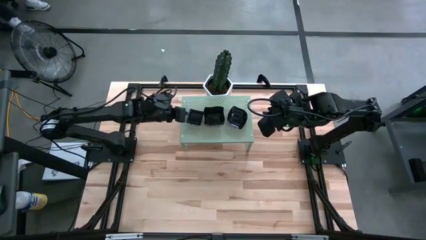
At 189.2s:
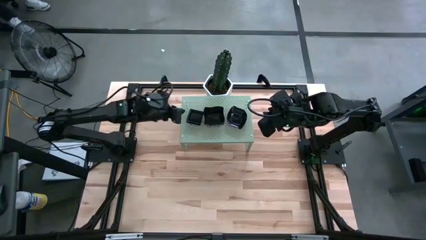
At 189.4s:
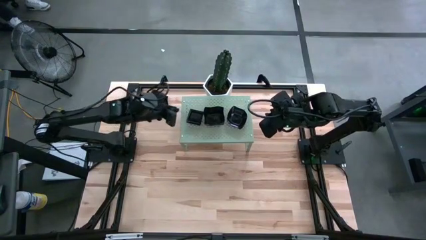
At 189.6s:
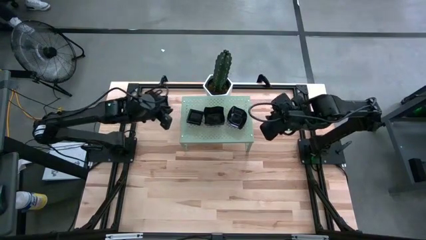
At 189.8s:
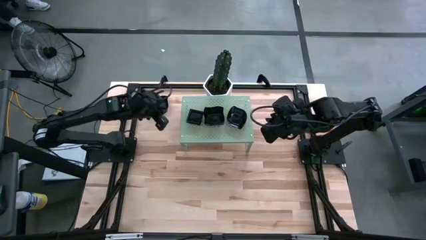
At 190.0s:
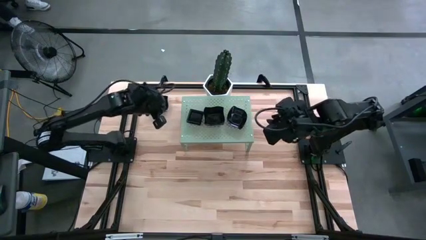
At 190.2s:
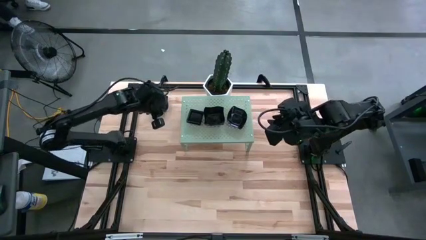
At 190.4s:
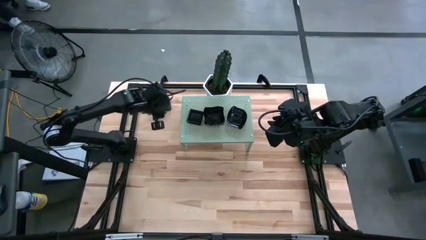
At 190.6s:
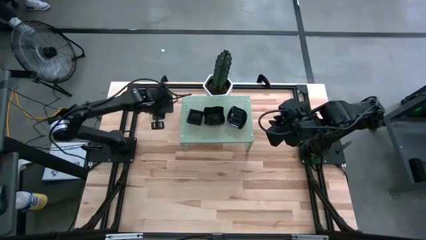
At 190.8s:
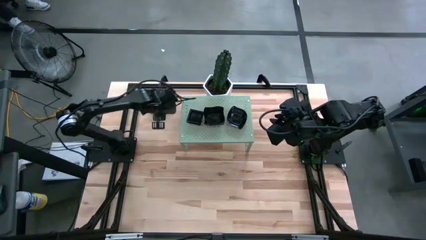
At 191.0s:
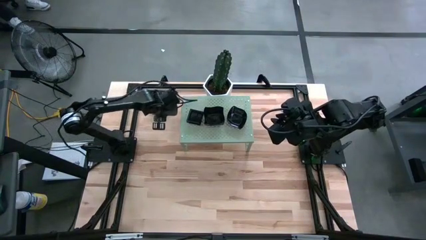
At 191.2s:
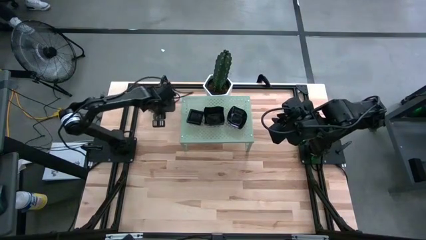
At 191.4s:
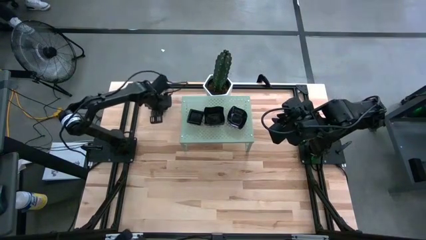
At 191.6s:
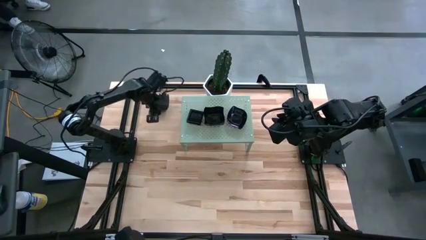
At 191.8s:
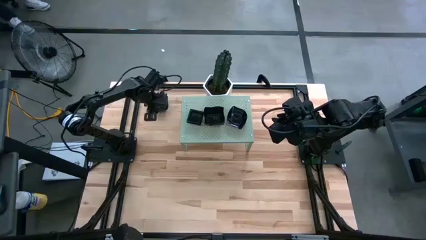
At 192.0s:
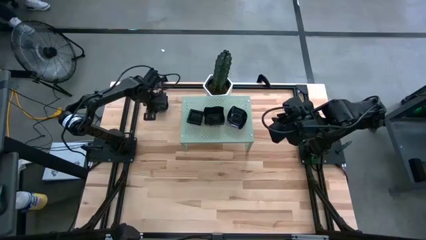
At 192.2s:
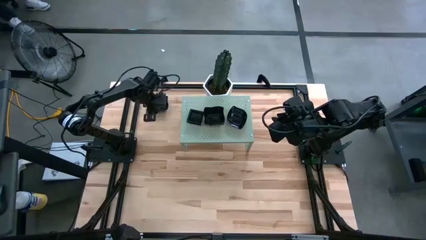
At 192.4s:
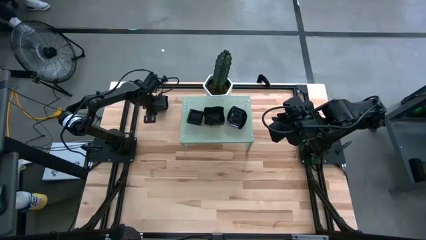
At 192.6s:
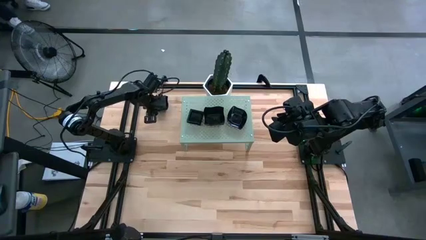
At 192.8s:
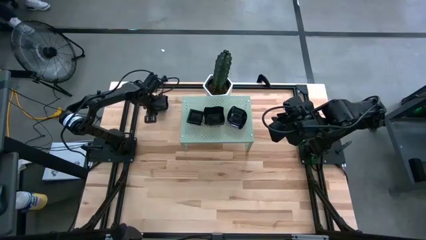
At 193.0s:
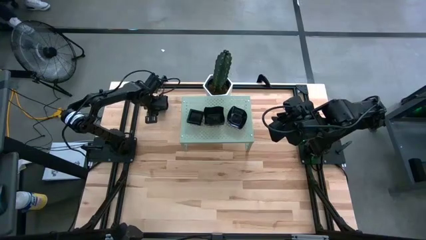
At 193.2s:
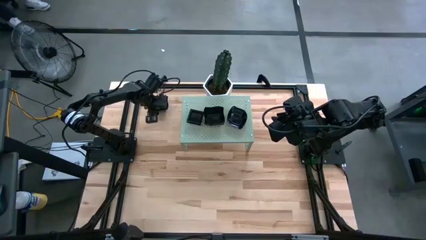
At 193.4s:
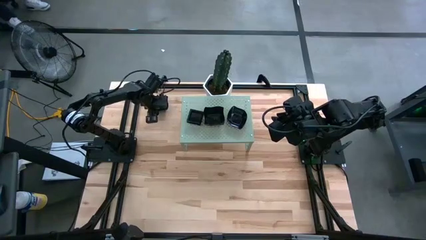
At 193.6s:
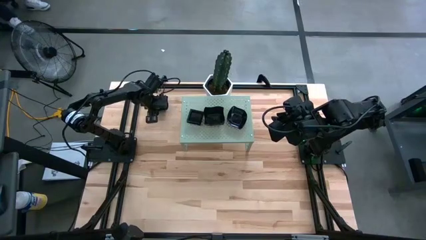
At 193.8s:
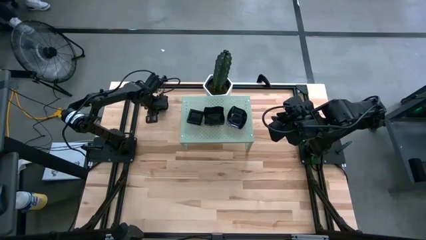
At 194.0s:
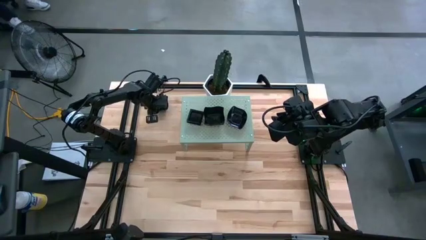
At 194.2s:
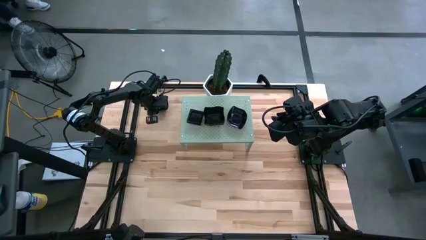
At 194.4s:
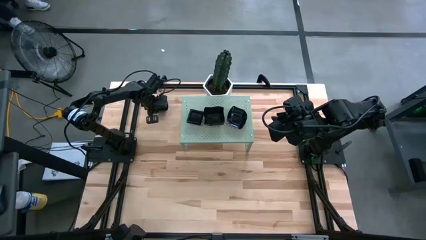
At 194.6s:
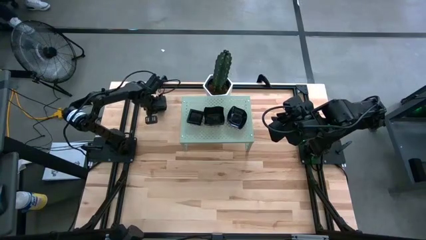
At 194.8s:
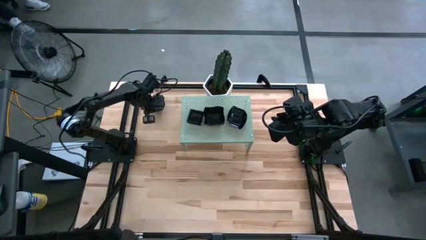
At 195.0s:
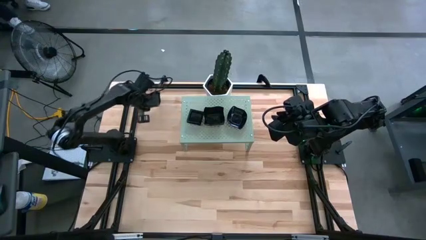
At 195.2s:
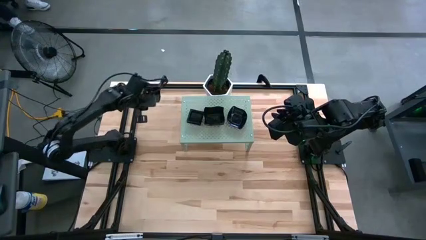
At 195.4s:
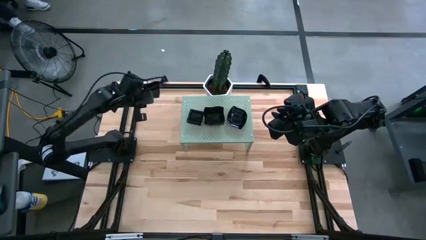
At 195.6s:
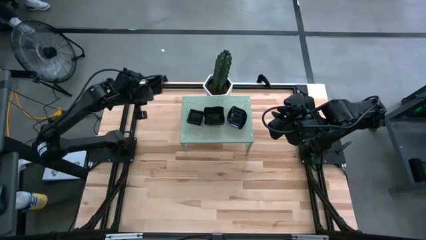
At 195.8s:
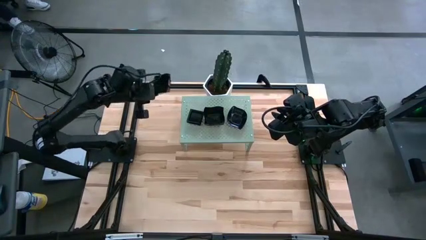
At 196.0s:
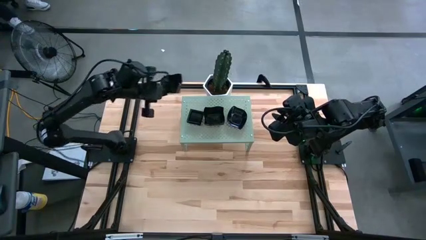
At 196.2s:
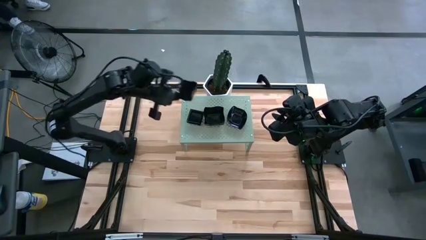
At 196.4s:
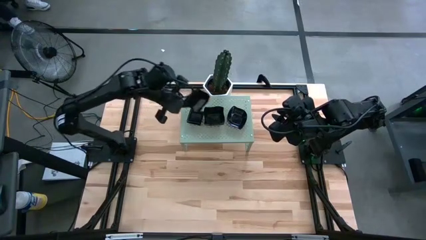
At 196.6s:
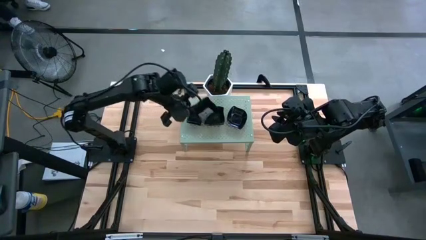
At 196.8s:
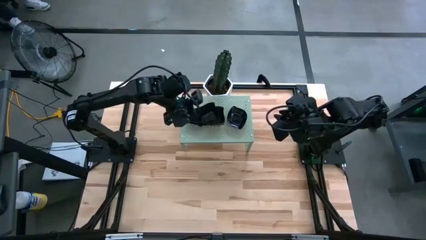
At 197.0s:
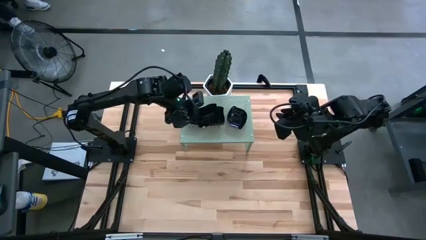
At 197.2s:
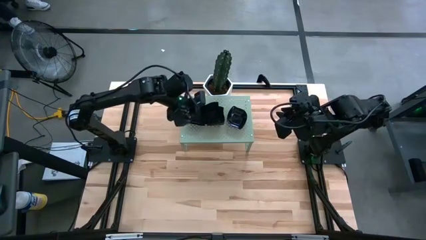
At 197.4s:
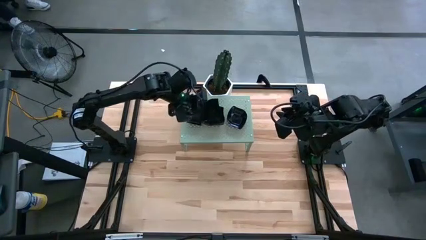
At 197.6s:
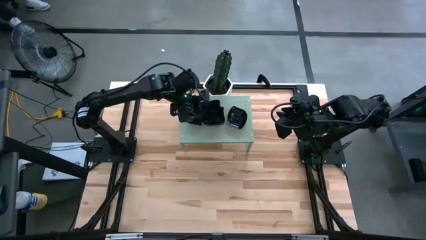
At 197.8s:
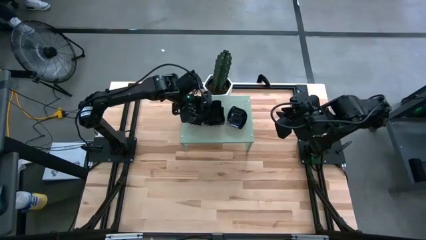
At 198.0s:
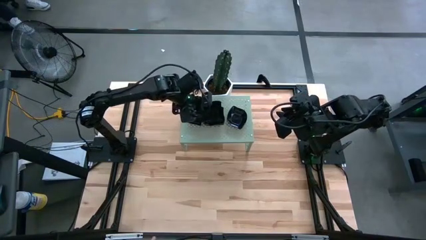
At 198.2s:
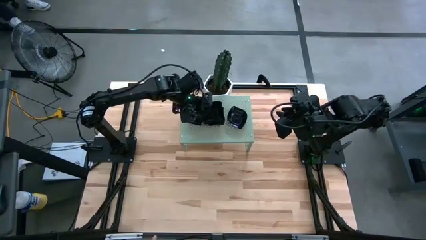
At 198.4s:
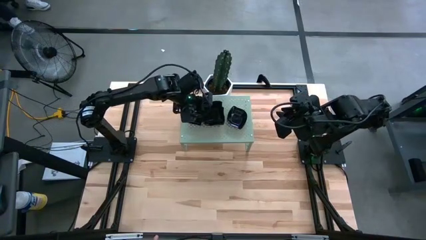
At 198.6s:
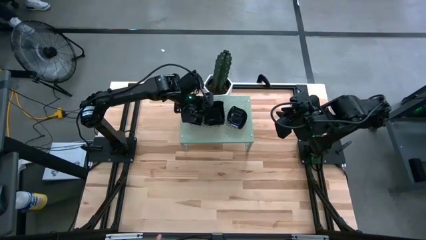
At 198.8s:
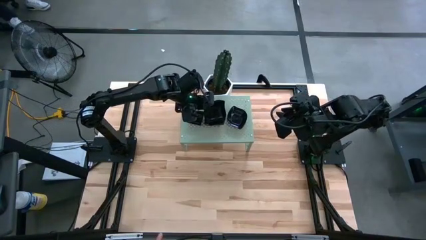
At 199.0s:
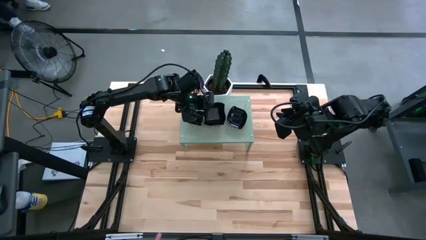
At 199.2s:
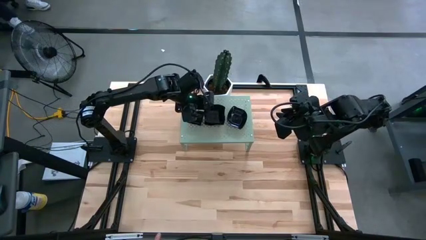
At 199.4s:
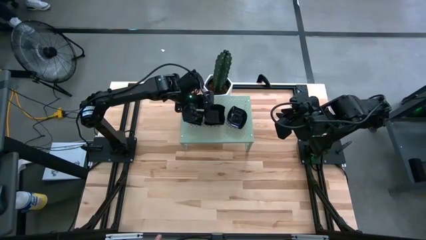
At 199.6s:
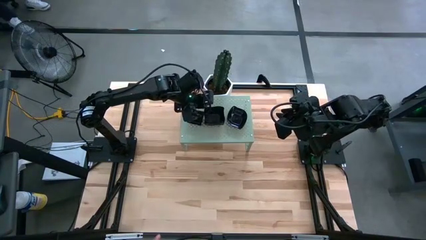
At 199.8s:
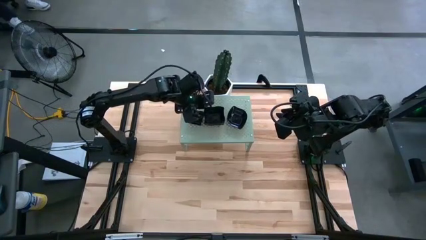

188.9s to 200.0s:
Task: Pick & Place Mini shaped plates
Stack the distorted square plate on top of the distorted square plates on the shelf

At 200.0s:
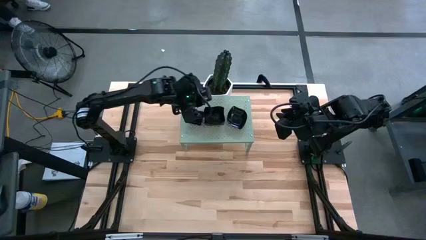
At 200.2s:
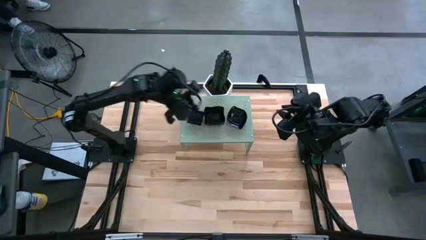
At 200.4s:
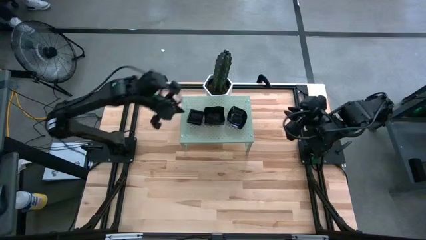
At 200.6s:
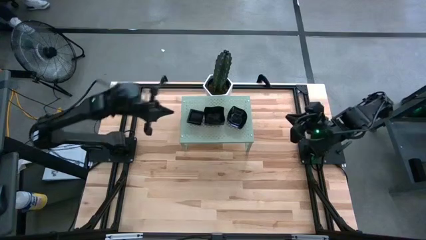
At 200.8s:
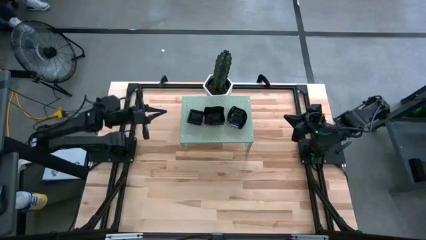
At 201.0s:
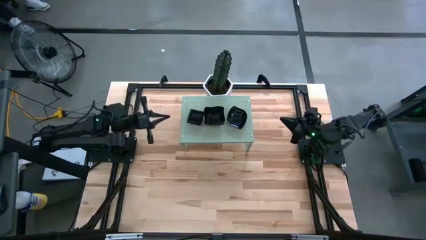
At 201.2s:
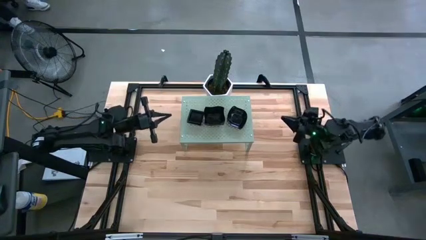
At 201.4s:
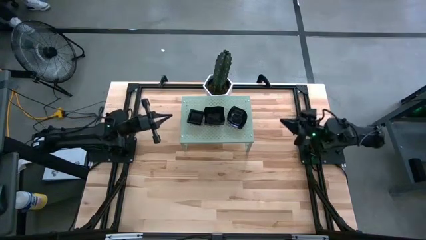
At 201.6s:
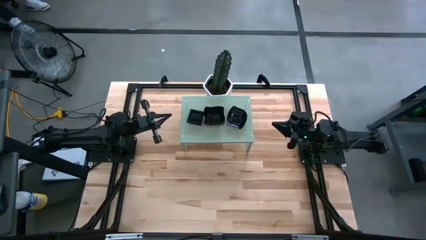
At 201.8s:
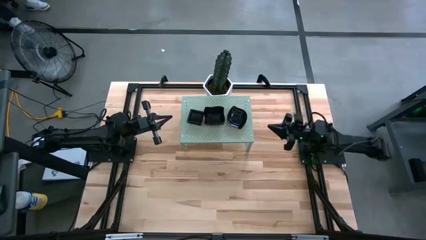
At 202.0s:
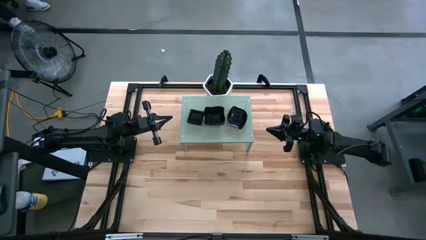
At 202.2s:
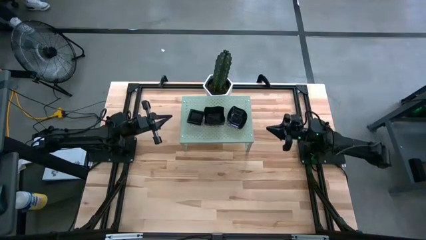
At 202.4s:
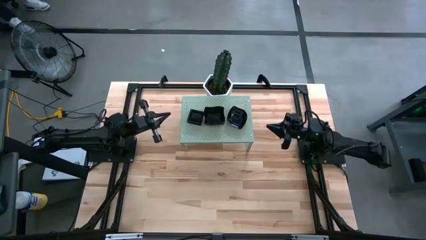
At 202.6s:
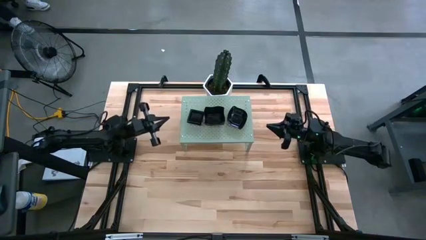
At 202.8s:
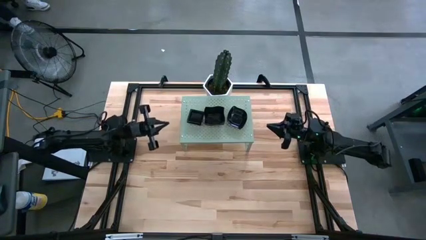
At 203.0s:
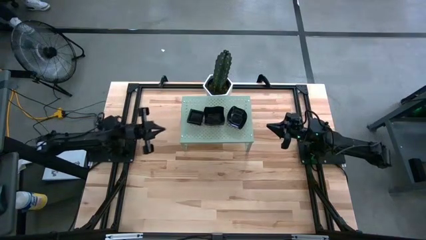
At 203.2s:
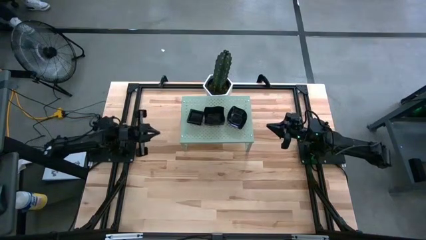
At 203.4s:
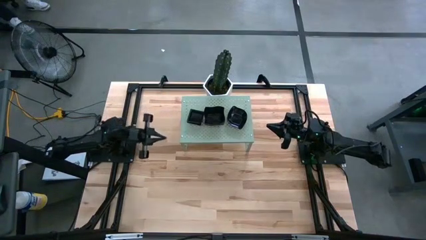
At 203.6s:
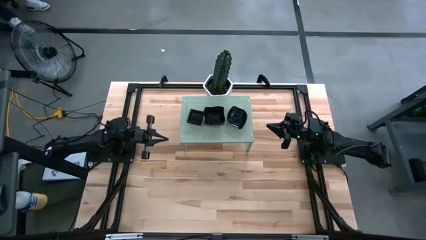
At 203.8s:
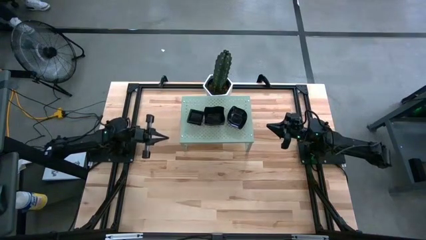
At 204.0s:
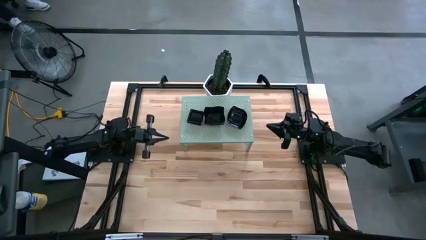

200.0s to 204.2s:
Return to Home Position

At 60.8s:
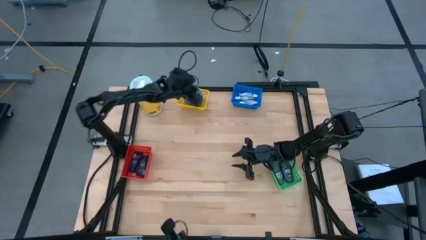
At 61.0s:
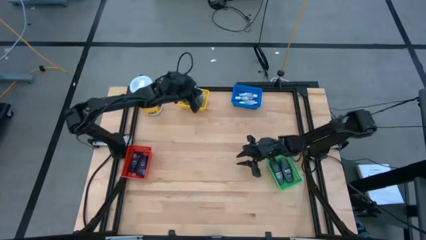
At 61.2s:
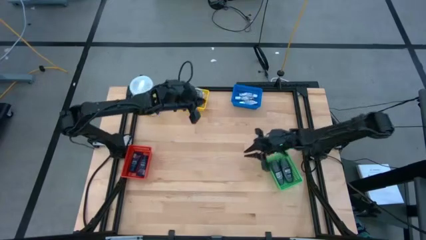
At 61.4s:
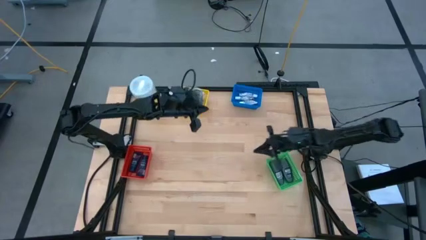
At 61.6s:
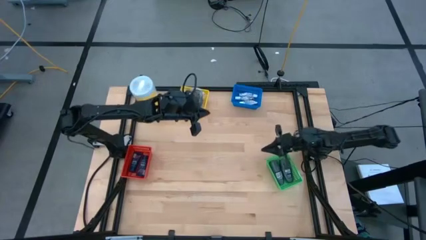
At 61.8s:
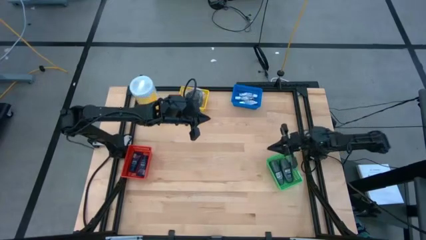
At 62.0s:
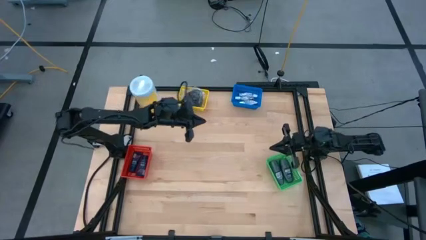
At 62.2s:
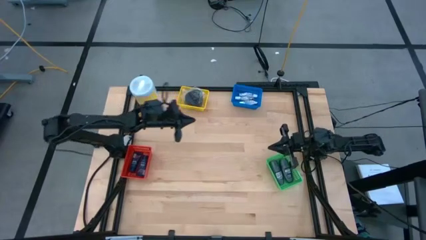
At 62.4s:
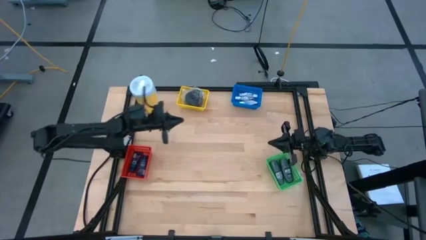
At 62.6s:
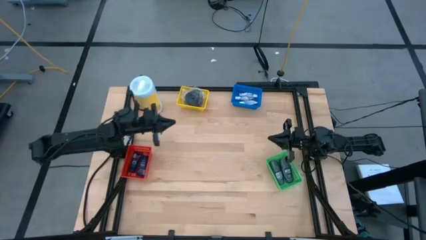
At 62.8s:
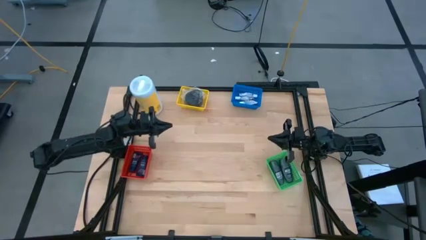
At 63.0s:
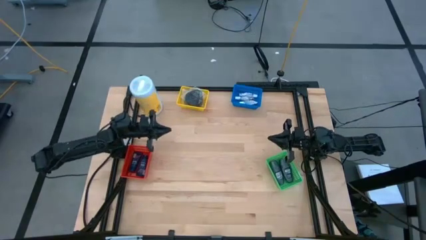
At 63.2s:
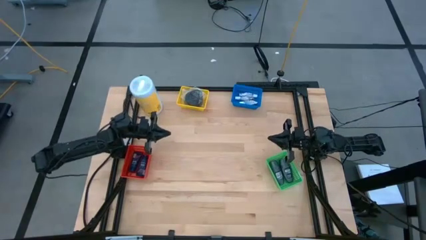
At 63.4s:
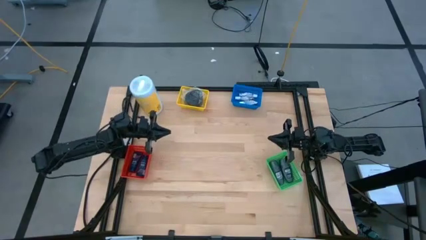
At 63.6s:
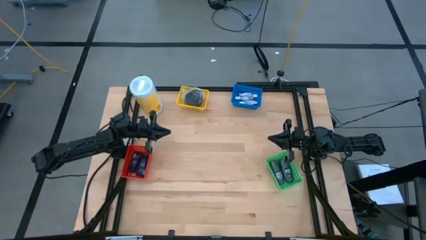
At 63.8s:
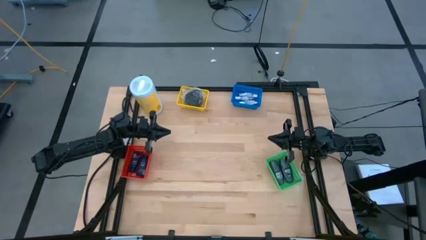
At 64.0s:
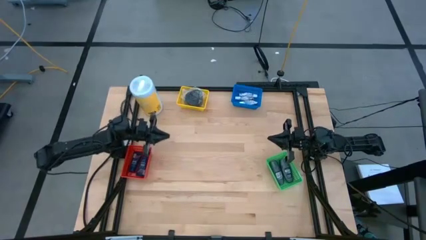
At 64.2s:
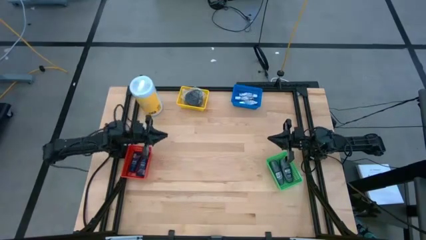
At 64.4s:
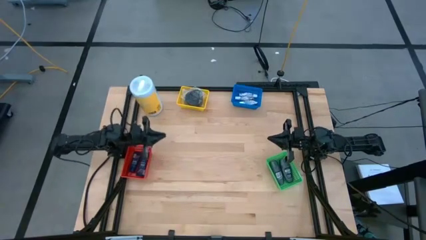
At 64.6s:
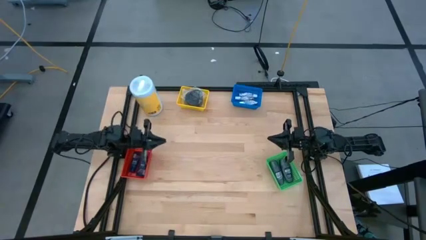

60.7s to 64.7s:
Task: Pick & Place Travel size toiletries
Return to Home Position
